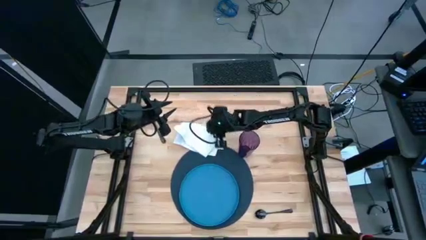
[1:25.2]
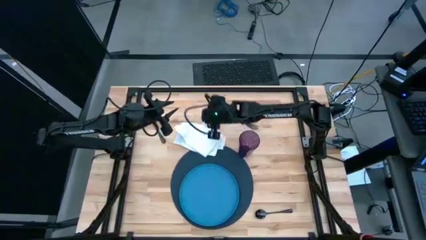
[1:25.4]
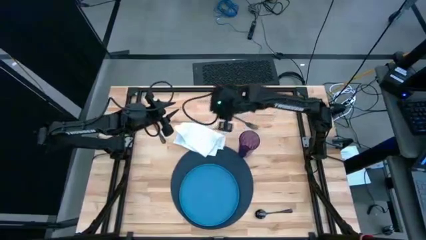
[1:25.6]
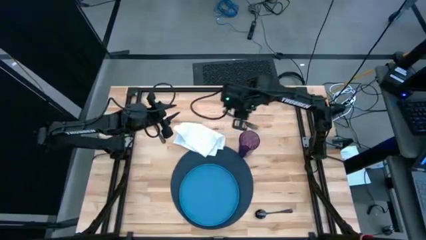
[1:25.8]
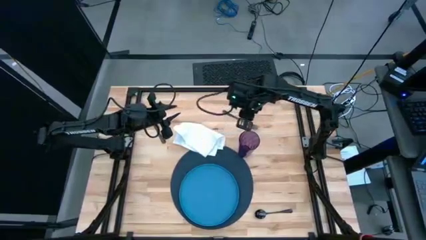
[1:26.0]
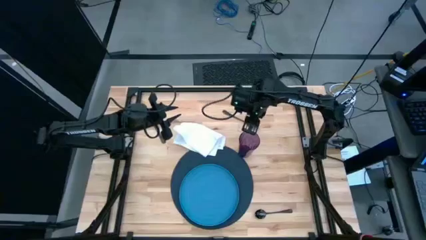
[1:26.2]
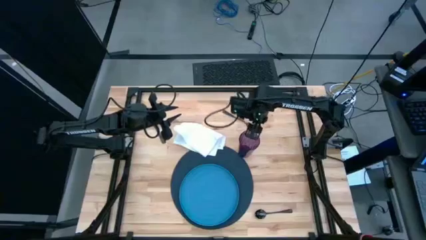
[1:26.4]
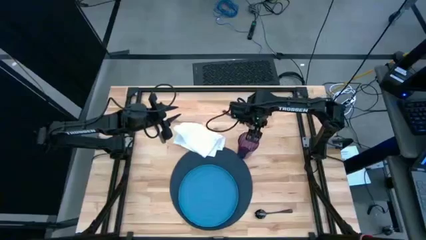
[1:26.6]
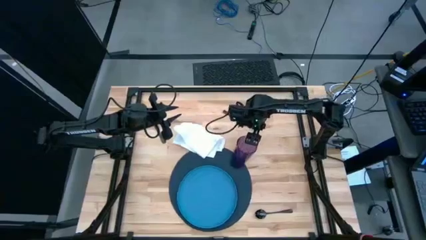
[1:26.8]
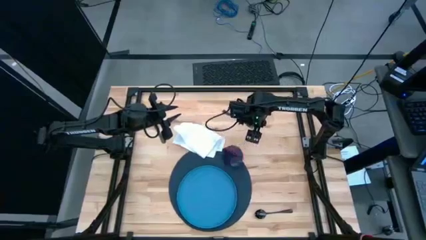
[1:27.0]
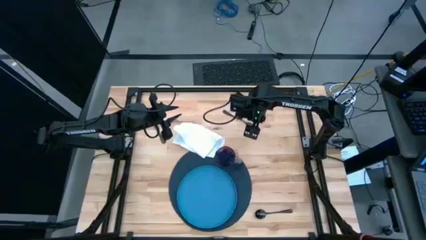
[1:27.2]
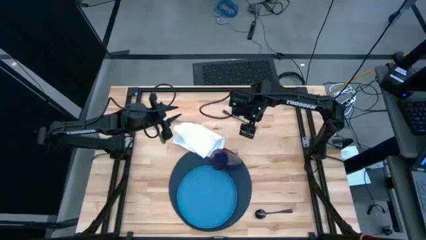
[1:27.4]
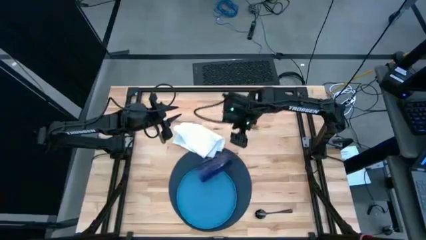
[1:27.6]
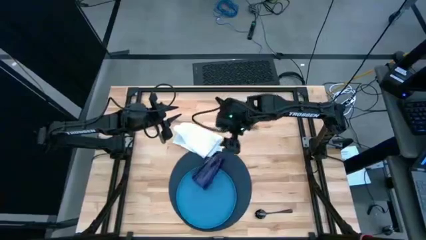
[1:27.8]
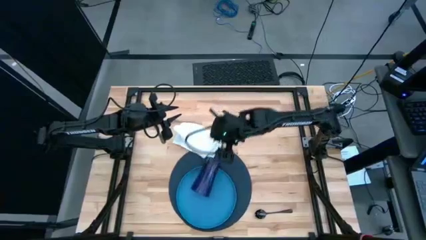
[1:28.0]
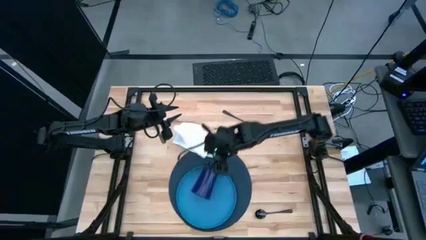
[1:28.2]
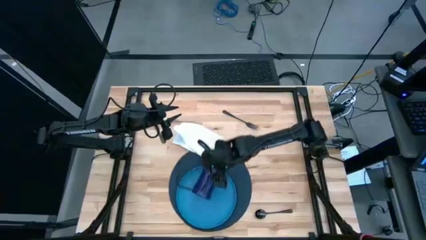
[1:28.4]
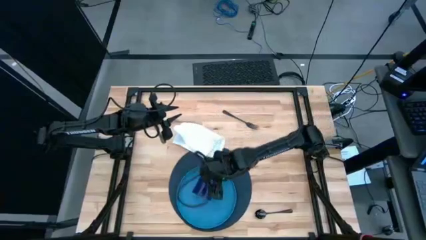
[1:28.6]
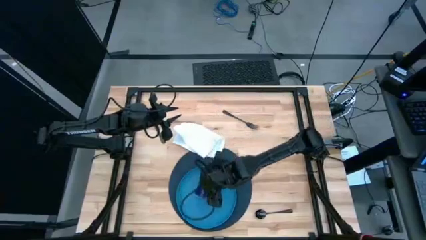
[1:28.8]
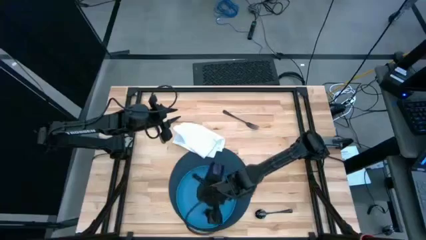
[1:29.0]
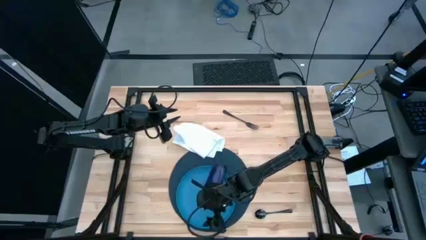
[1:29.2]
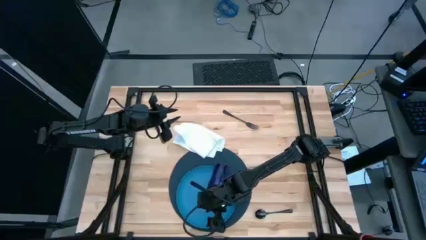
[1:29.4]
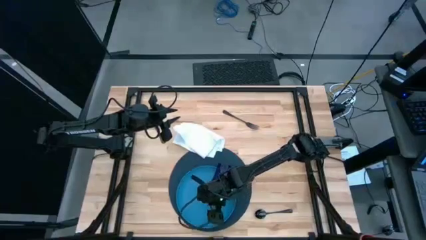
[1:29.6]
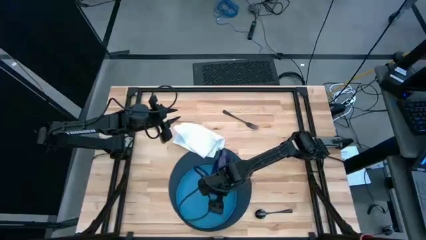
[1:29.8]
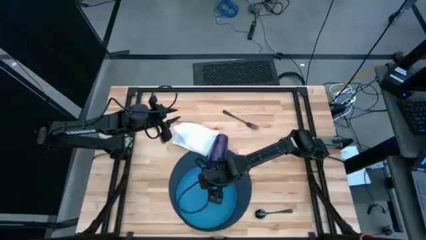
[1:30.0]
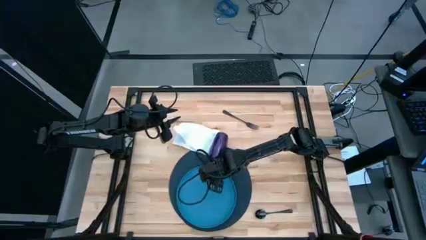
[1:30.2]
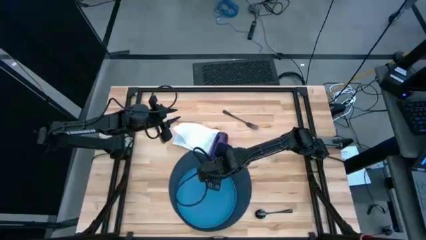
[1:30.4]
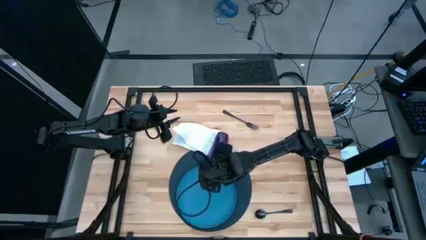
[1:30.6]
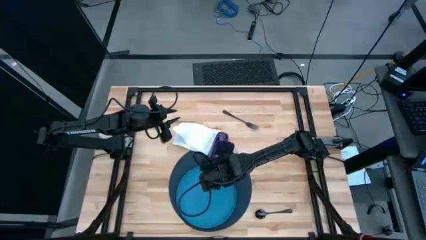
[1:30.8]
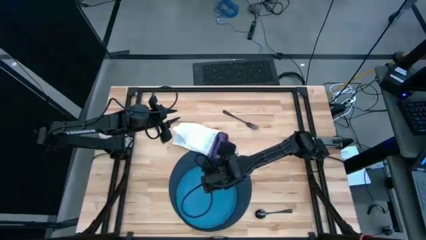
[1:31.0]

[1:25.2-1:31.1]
Task: Set table place
Move the purple cup to the top right of the table

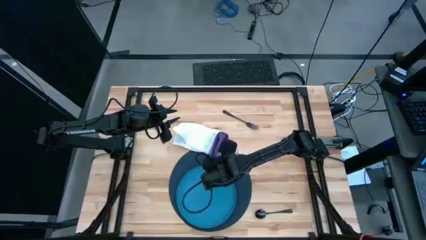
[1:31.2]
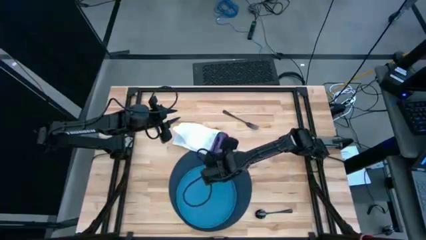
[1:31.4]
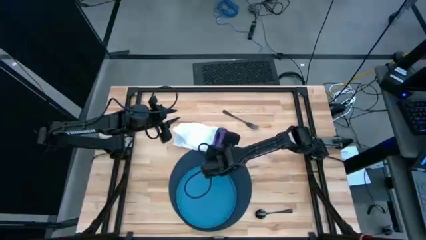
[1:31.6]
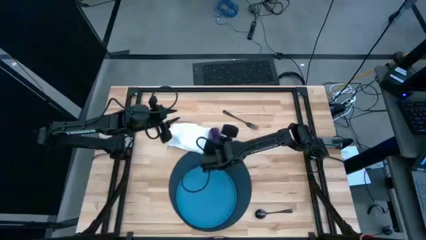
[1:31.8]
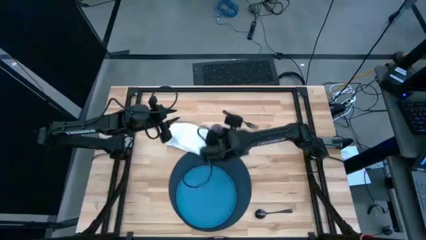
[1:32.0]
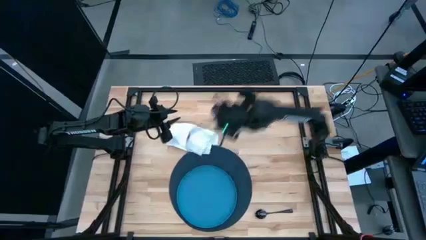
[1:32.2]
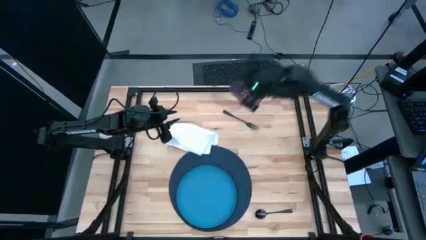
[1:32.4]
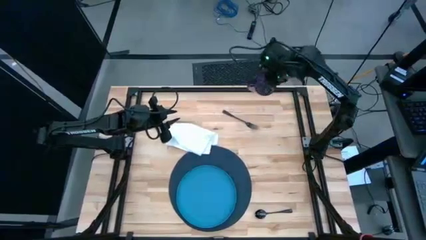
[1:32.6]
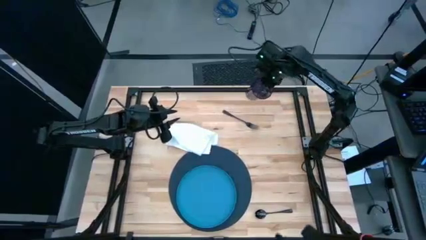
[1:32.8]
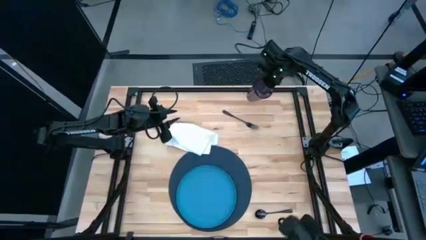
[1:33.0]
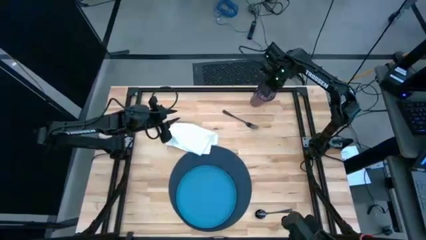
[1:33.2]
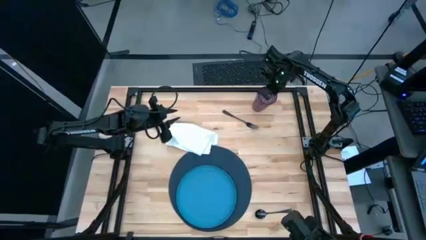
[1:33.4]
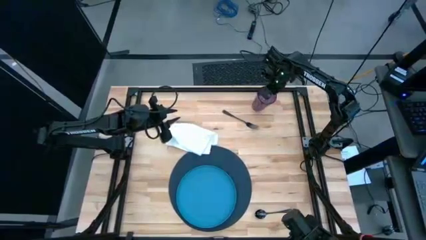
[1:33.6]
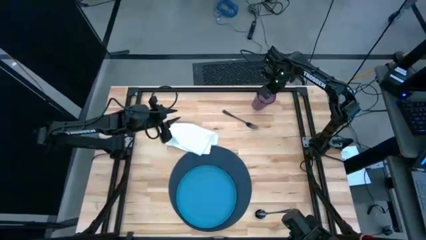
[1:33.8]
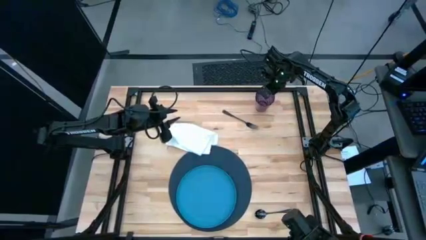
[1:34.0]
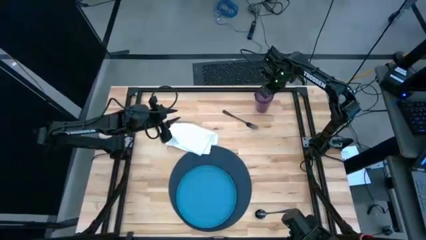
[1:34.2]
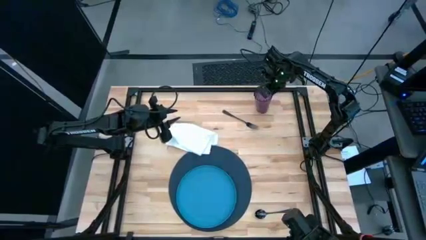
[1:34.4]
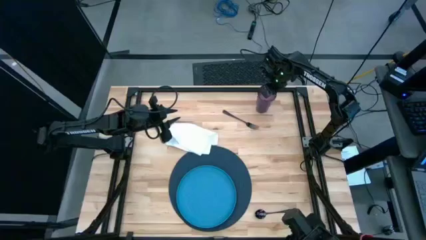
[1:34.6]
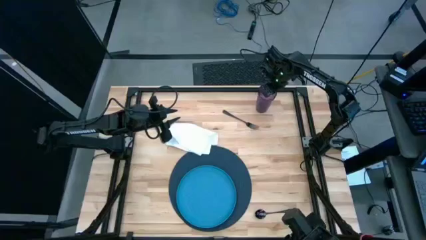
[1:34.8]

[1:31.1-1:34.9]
Move the purple cup to the top right of the table

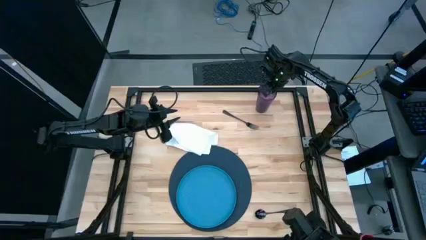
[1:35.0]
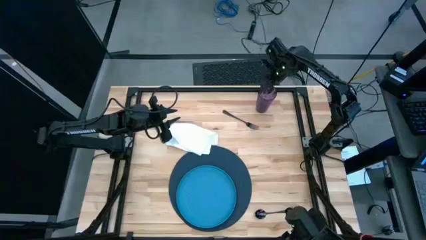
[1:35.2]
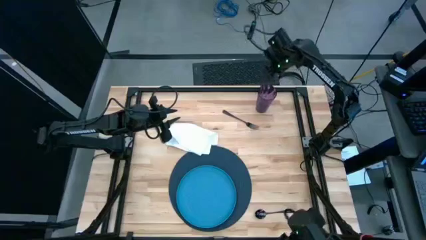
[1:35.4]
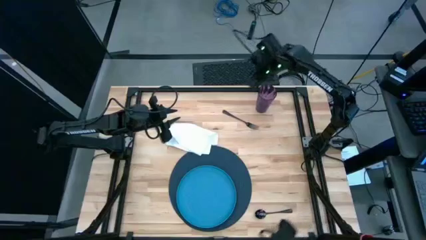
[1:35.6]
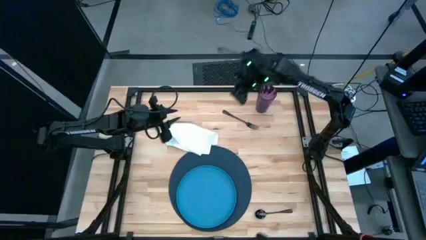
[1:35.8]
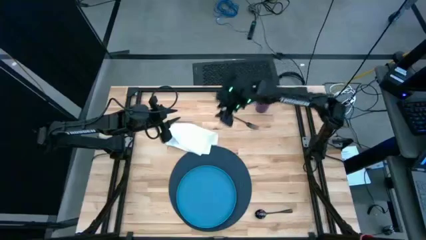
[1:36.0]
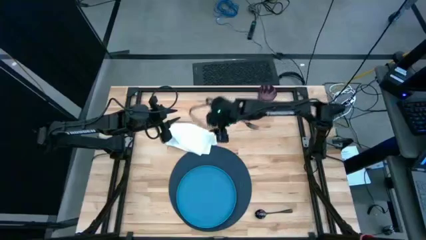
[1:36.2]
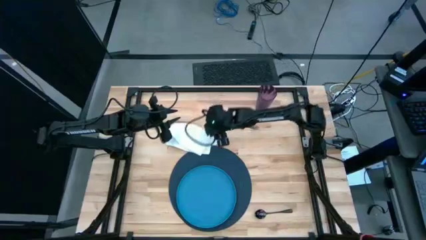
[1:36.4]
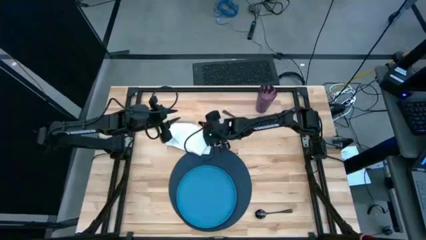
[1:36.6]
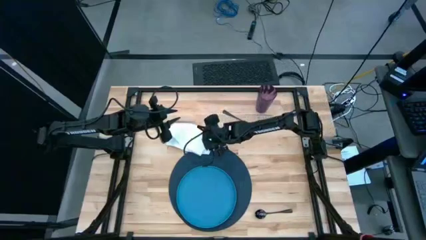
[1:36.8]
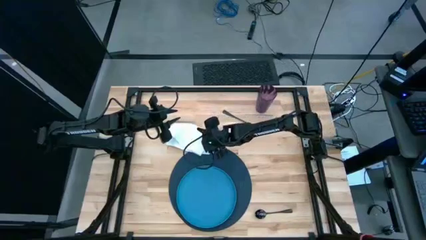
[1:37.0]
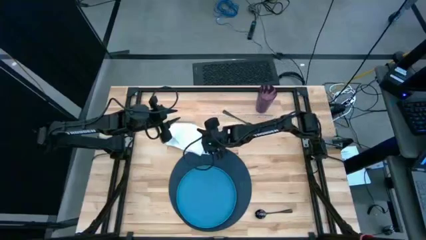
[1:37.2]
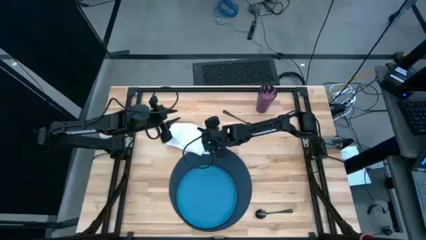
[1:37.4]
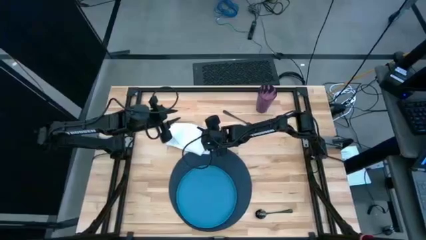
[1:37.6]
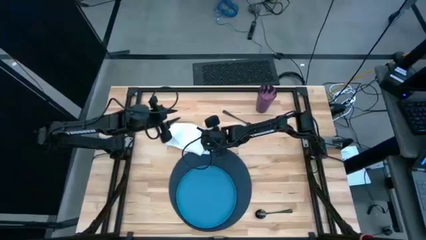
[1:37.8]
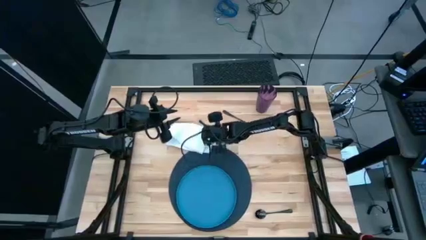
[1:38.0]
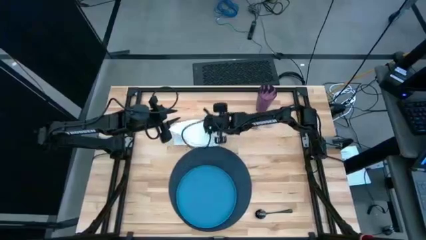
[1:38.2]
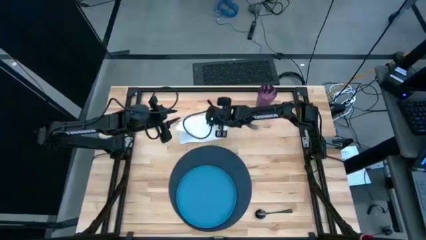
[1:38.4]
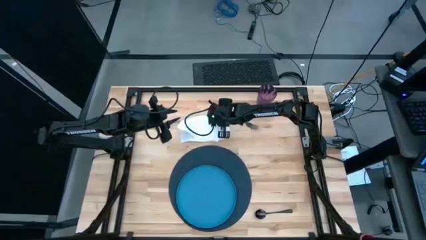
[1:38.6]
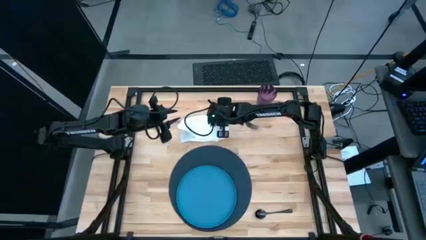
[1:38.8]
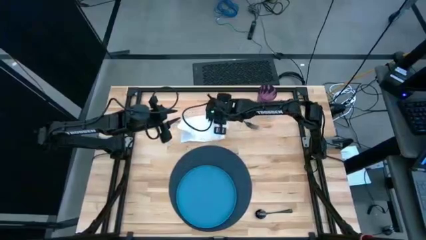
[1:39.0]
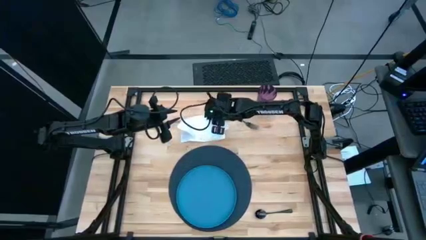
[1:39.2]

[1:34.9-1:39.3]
Fold the white napkin
